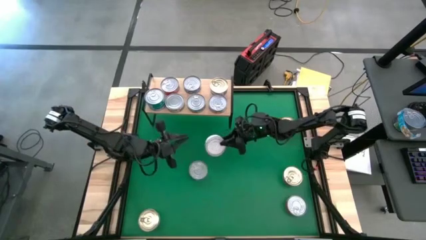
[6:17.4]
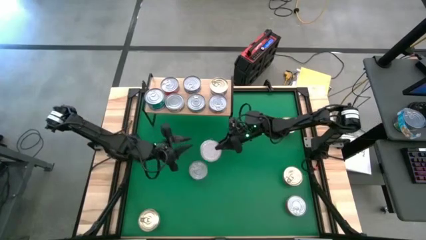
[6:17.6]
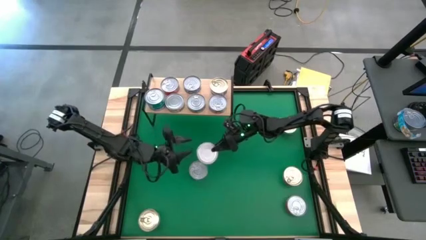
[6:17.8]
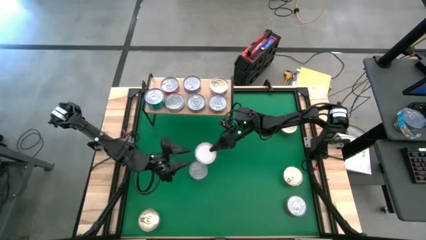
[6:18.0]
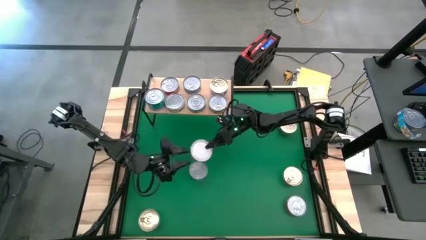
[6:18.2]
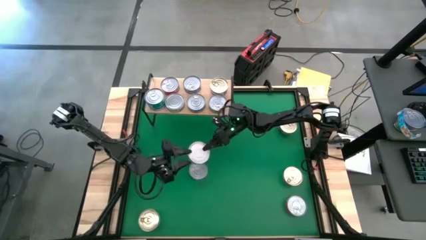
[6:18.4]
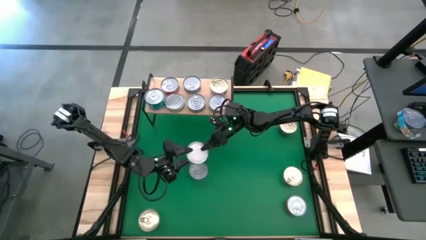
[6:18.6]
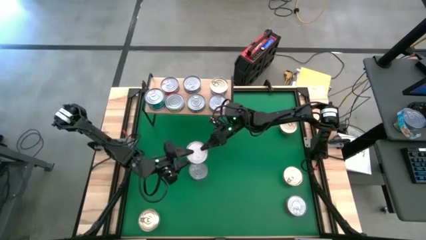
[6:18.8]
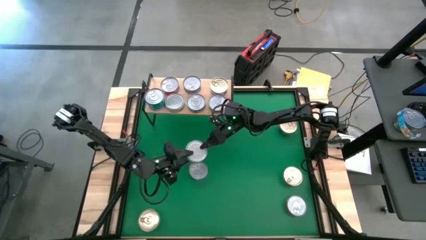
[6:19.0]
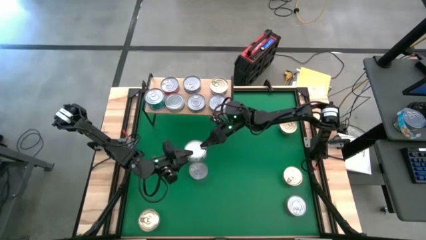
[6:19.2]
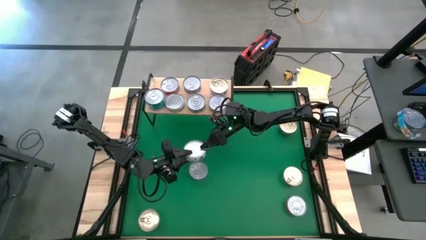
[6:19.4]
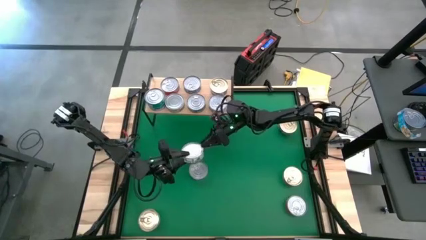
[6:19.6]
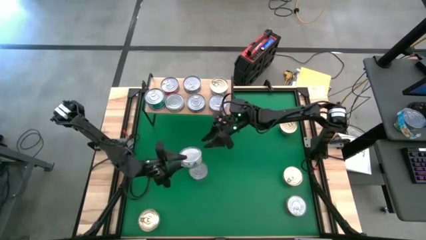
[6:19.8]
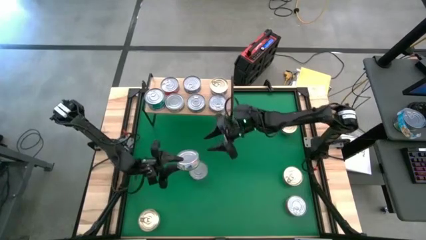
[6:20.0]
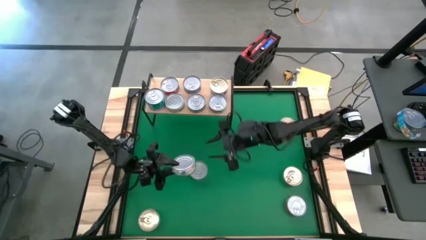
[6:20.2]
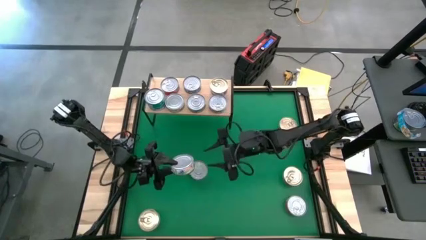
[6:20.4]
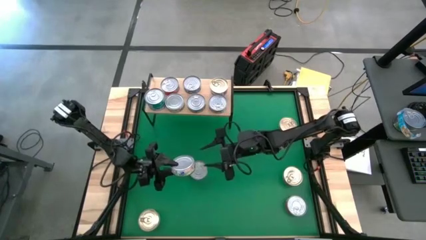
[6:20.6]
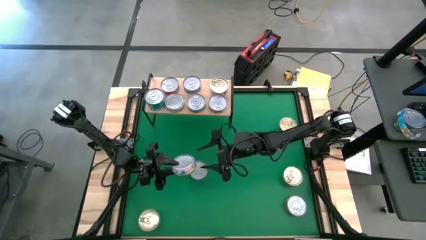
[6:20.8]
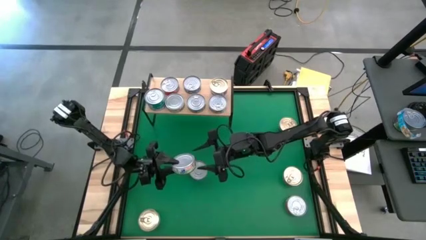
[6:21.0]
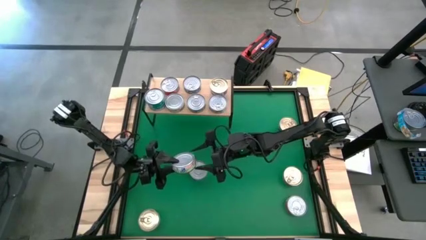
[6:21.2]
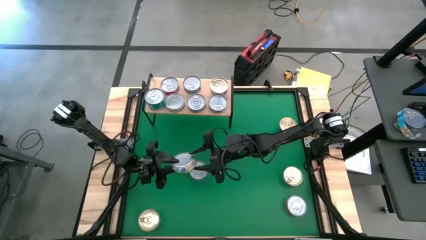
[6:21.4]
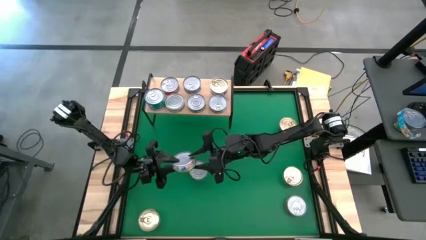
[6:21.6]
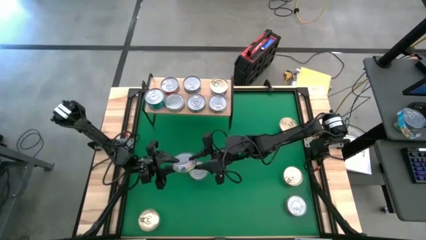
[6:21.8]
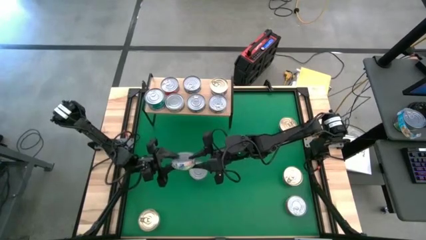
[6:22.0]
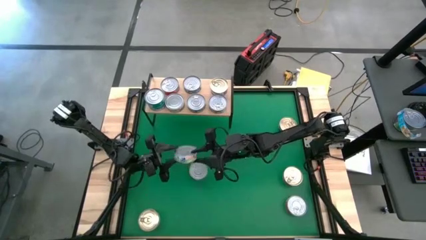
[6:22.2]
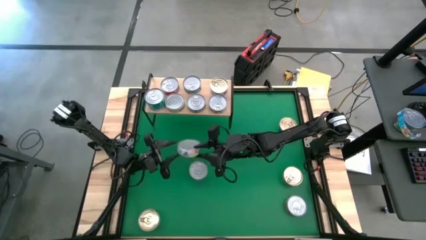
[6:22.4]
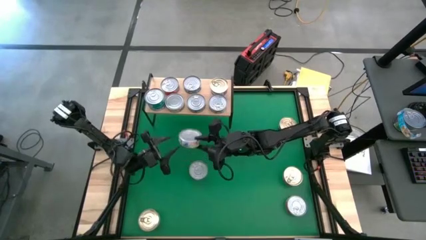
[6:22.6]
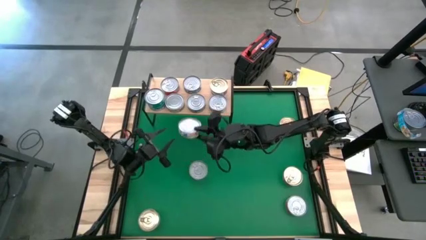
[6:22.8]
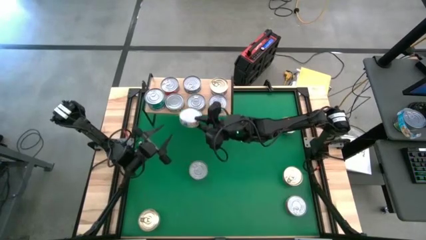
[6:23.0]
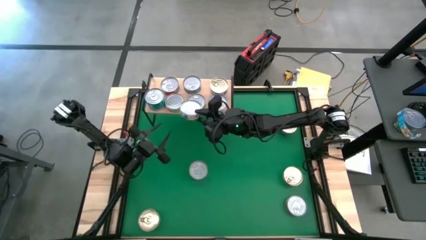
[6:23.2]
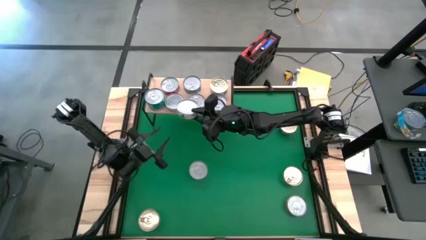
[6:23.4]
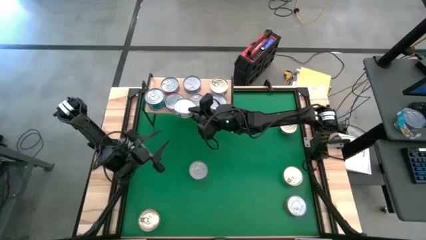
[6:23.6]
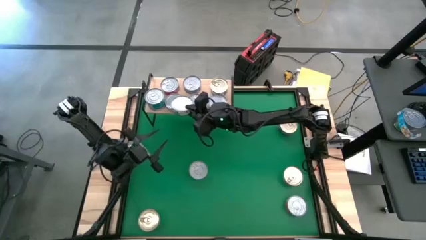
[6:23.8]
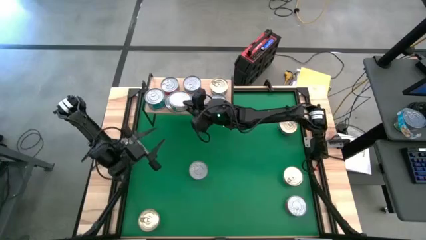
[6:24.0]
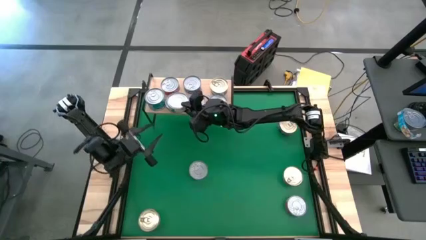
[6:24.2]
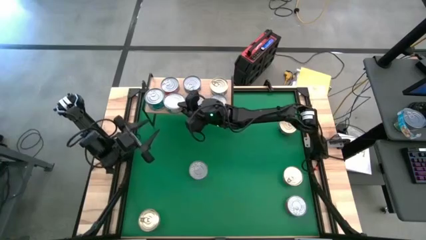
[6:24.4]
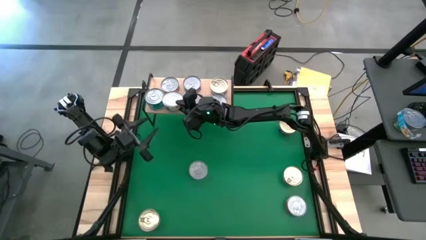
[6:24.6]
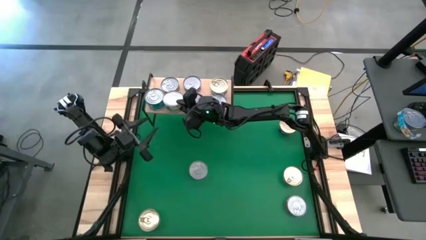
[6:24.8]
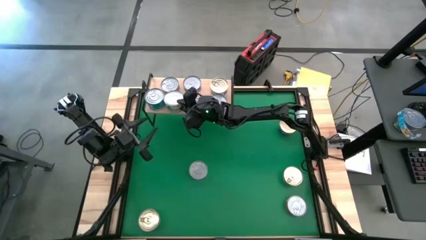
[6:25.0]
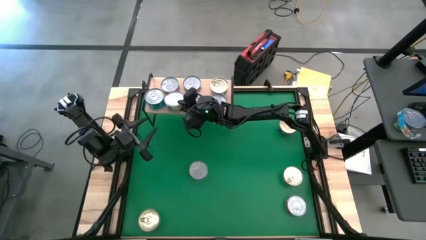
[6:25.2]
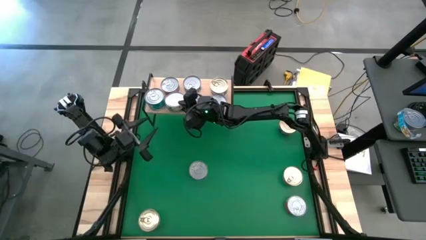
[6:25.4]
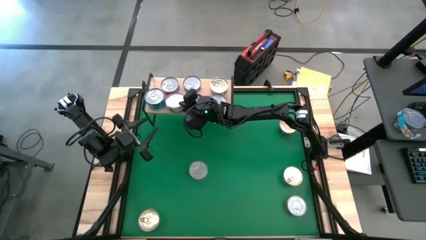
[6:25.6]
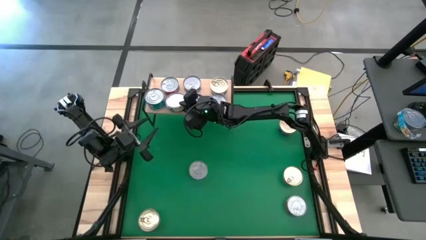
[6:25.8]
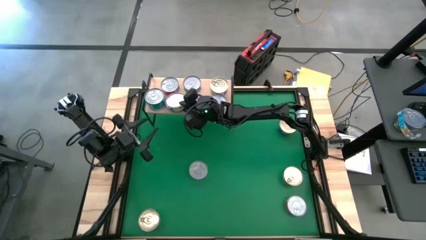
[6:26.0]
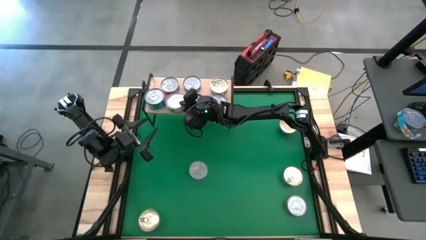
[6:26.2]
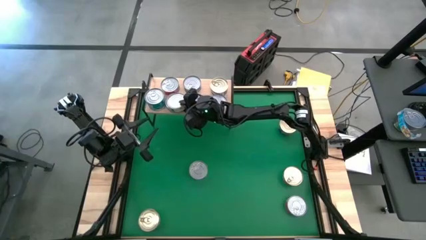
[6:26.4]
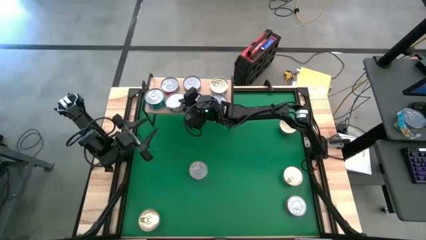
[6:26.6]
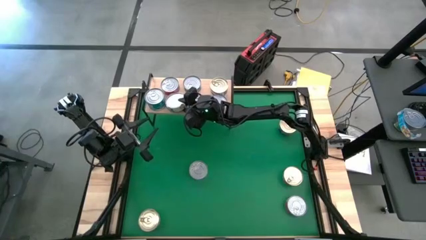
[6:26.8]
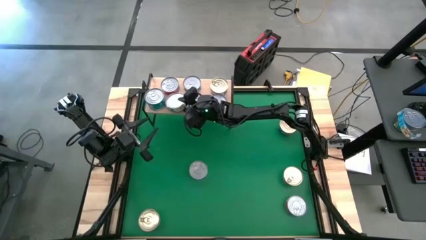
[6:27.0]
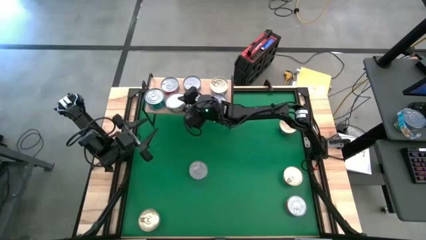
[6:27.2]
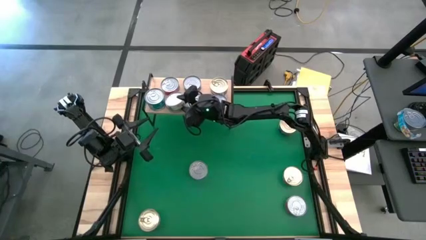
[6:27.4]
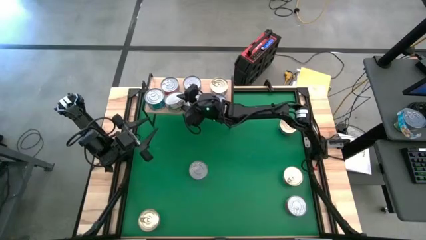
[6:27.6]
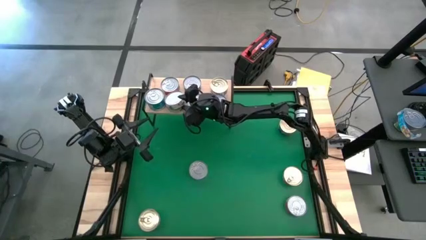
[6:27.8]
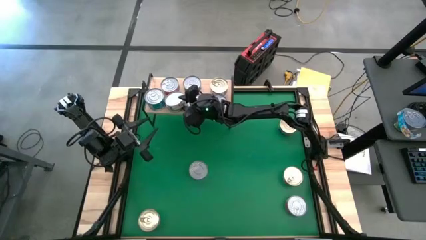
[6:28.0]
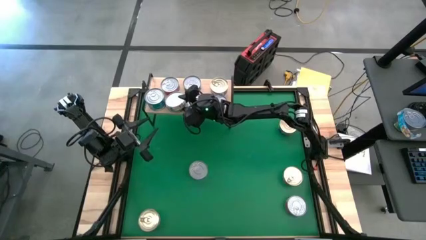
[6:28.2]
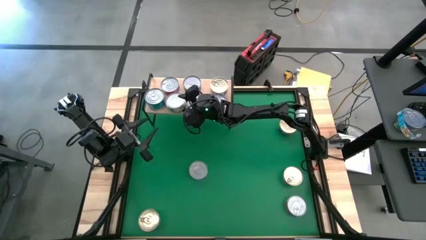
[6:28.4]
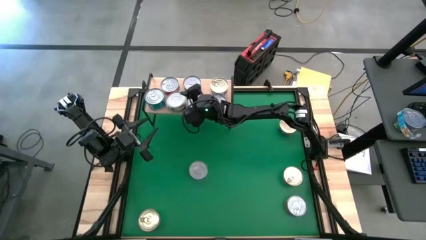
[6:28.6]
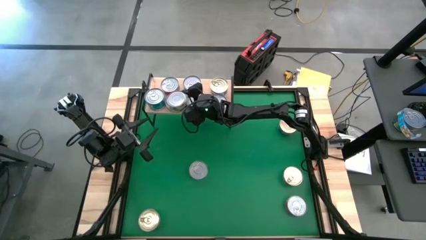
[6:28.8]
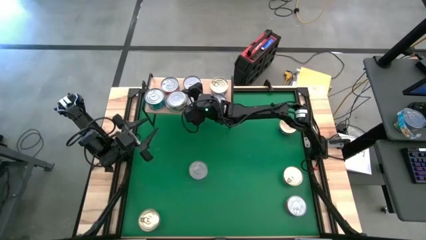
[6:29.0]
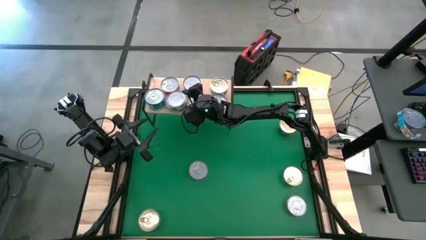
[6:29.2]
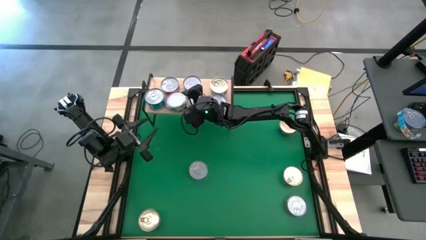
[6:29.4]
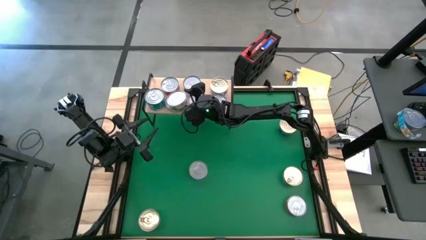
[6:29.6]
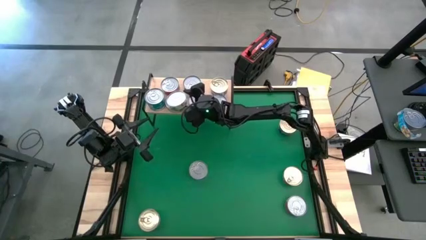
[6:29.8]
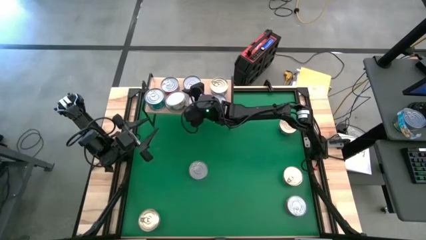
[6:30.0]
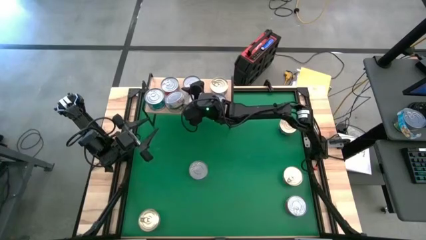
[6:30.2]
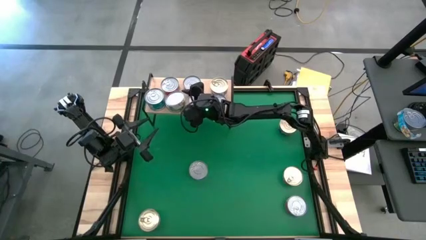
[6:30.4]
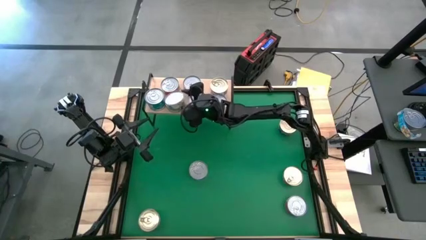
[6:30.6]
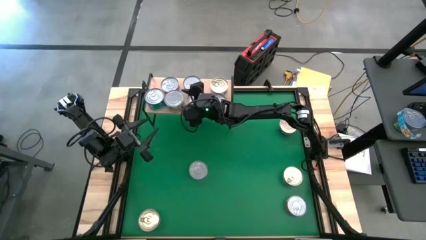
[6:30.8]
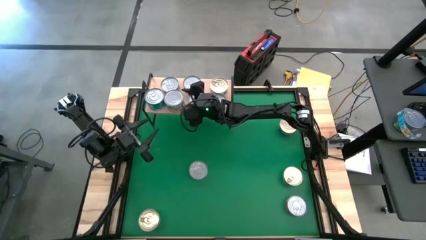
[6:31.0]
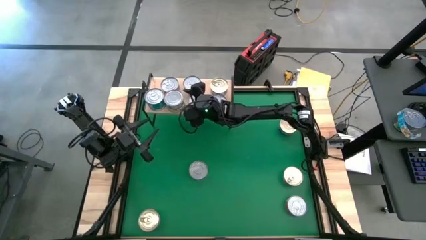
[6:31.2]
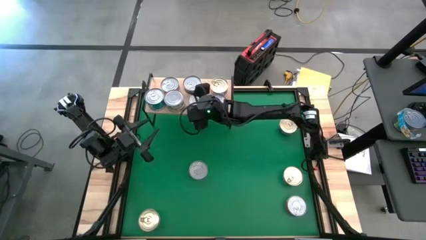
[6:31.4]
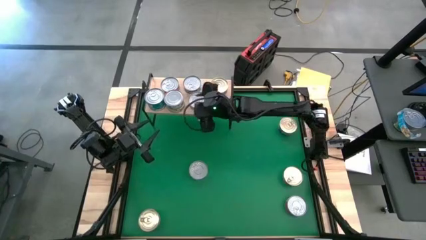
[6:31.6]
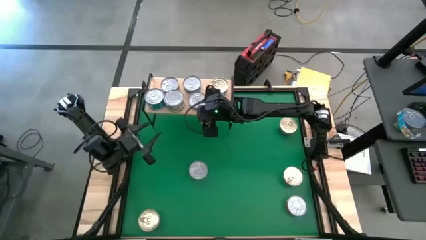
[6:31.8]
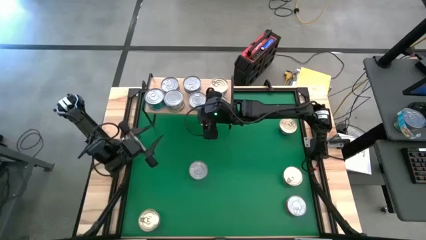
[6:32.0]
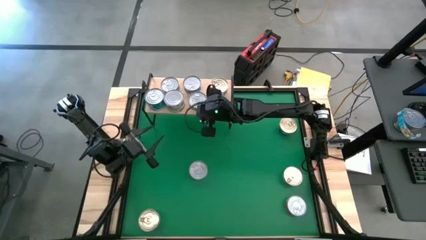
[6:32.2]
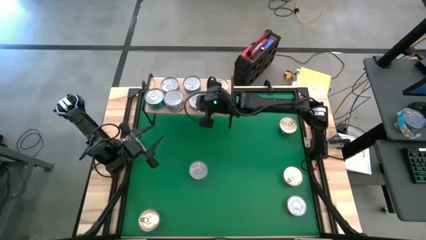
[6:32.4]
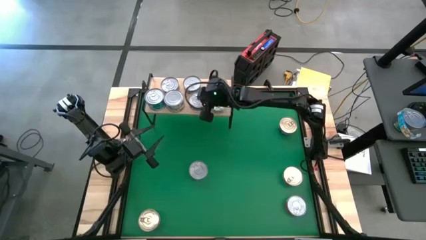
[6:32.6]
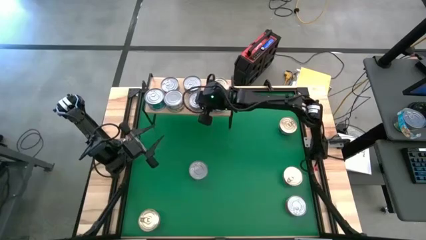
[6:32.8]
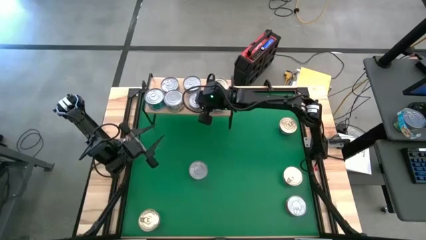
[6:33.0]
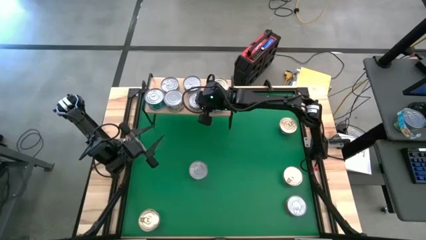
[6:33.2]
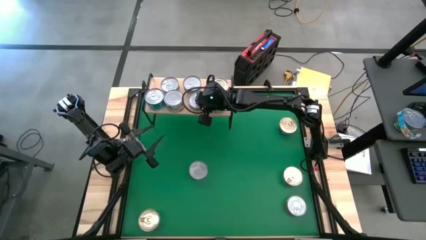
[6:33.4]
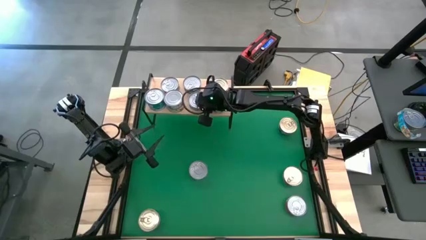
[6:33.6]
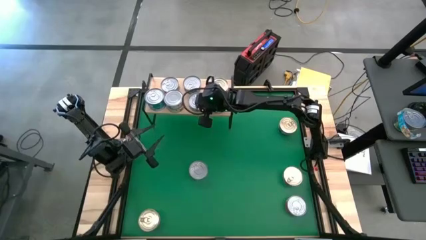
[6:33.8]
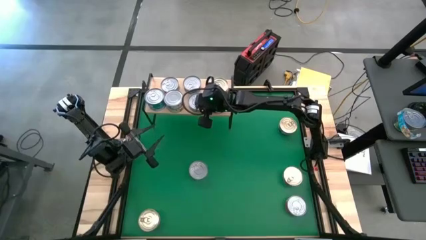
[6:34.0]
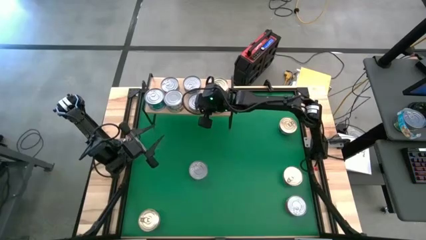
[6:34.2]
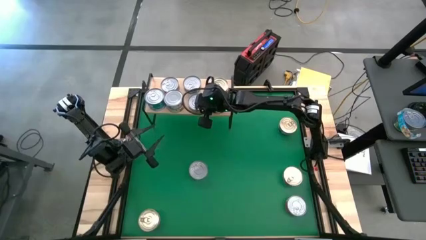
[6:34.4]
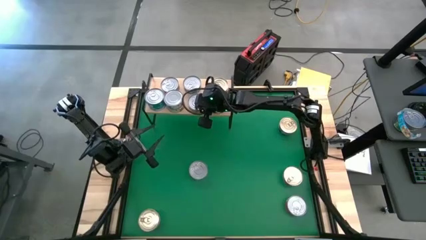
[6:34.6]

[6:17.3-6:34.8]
Task: Stack canned seafood by type on shelf
Stack the white tuna can on top of the white tuna can on the shelf
